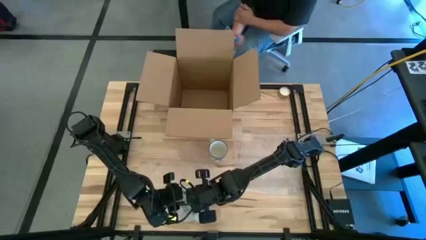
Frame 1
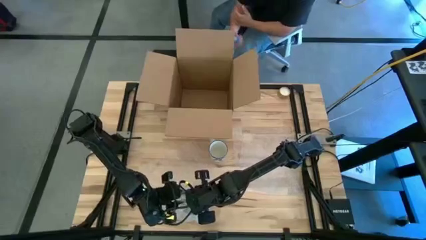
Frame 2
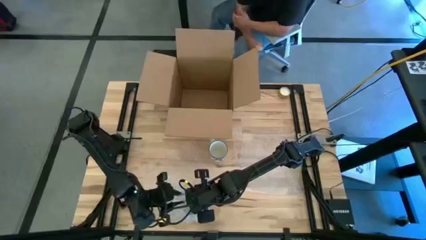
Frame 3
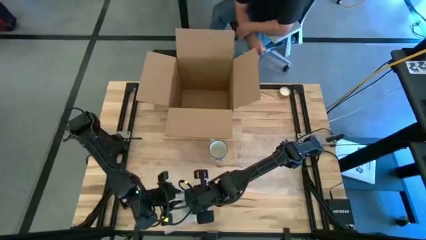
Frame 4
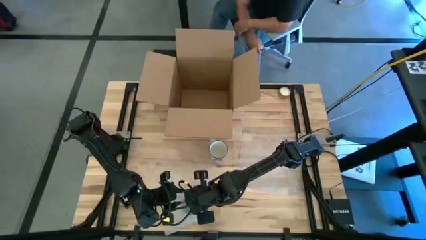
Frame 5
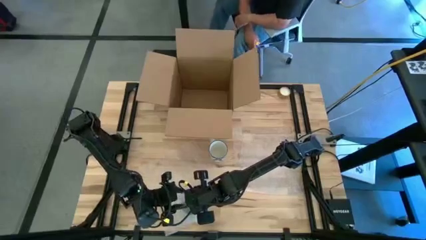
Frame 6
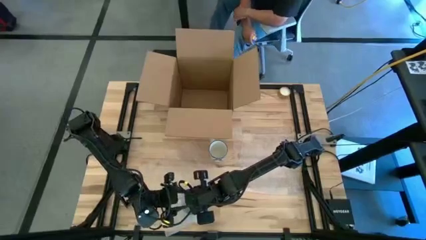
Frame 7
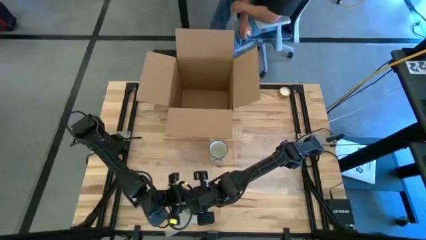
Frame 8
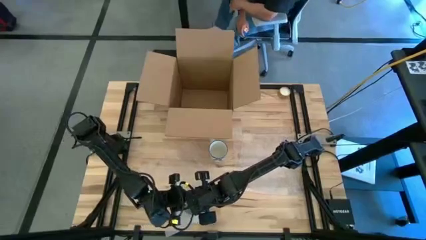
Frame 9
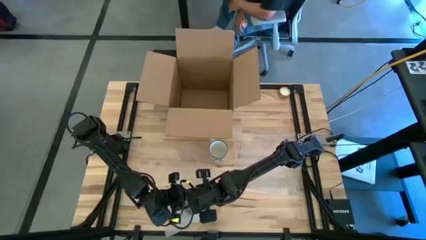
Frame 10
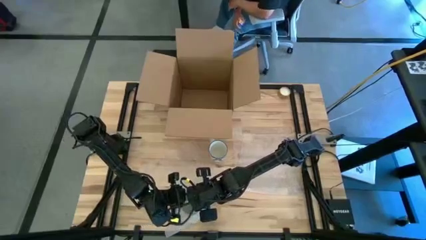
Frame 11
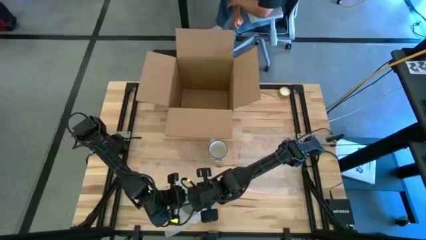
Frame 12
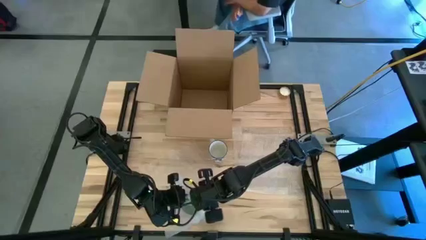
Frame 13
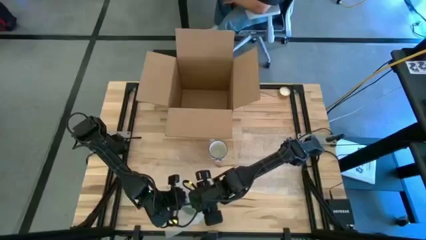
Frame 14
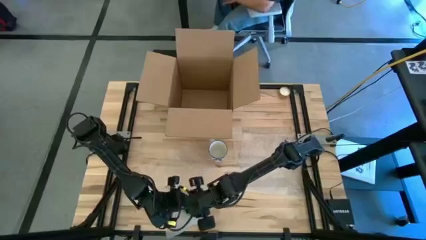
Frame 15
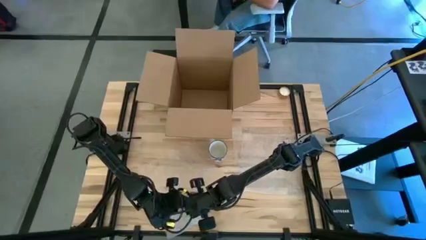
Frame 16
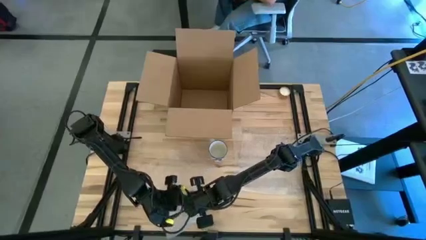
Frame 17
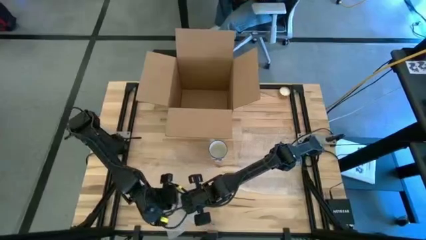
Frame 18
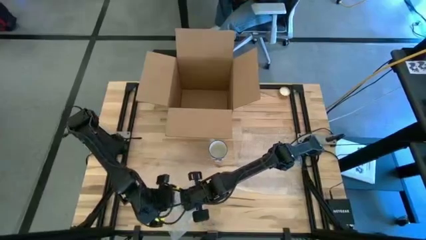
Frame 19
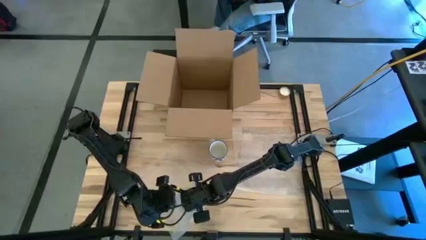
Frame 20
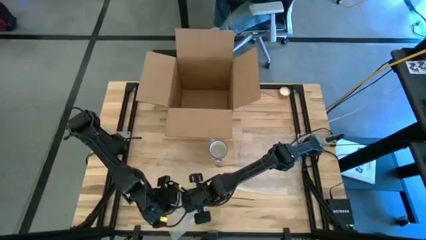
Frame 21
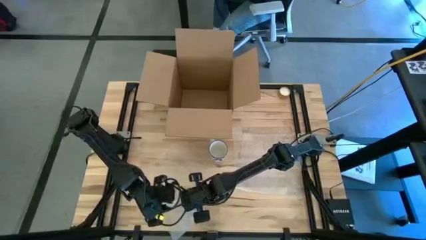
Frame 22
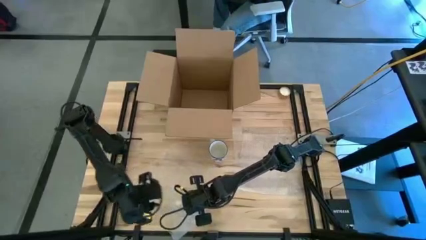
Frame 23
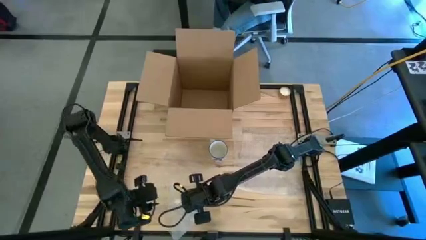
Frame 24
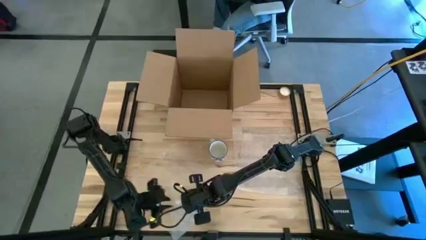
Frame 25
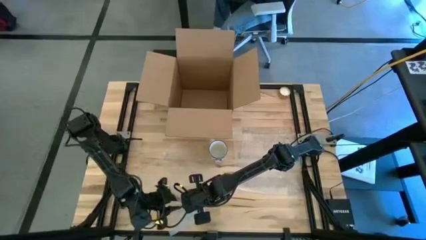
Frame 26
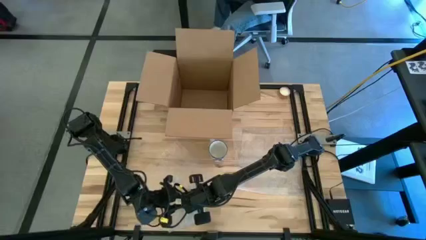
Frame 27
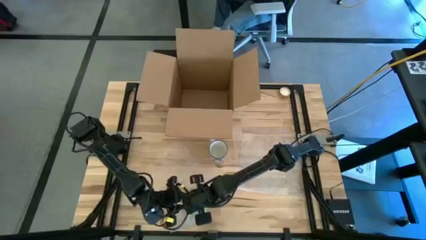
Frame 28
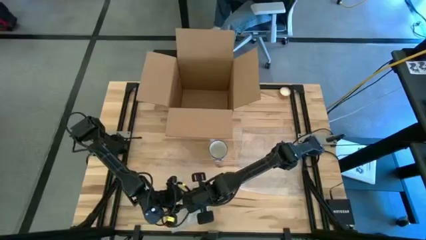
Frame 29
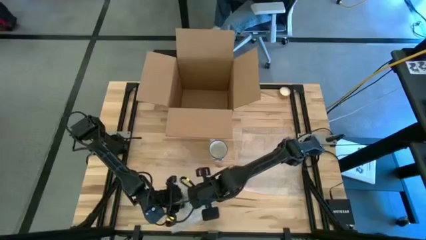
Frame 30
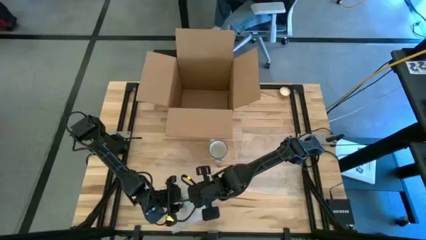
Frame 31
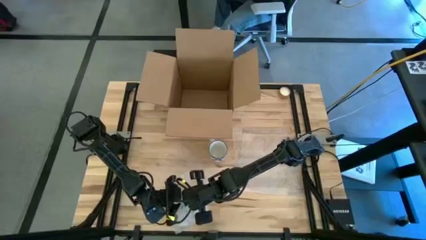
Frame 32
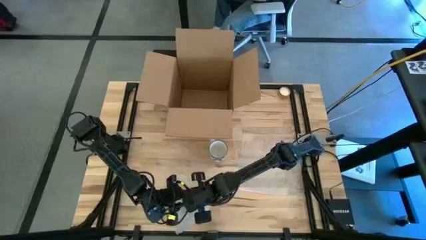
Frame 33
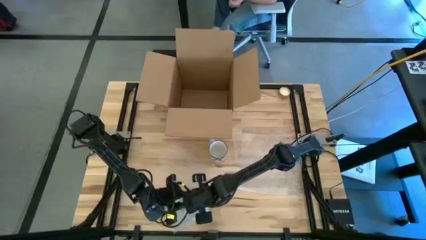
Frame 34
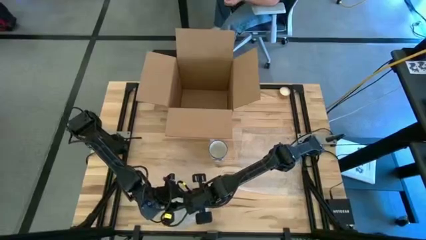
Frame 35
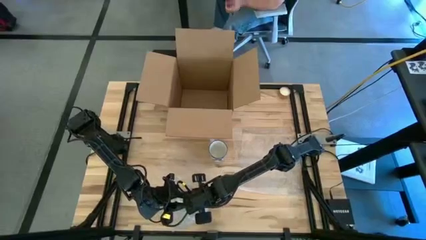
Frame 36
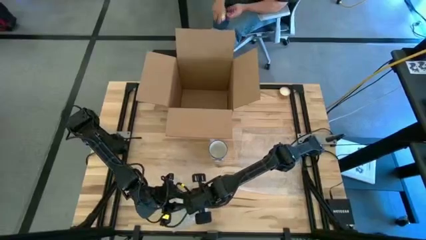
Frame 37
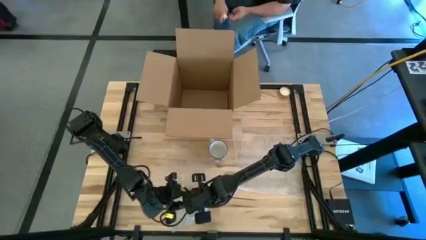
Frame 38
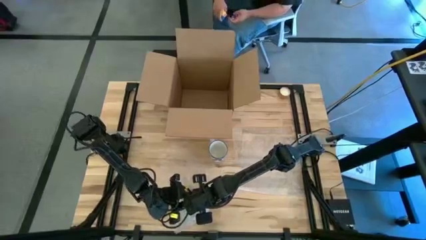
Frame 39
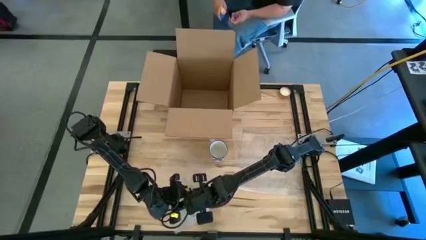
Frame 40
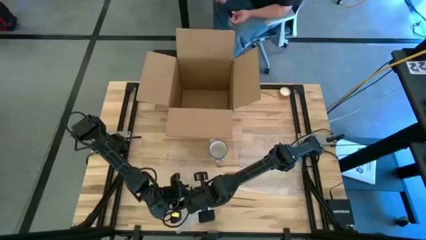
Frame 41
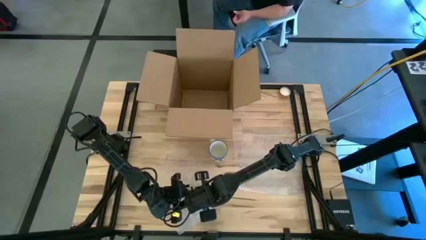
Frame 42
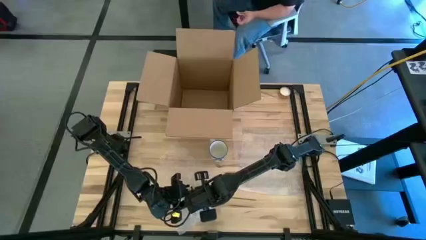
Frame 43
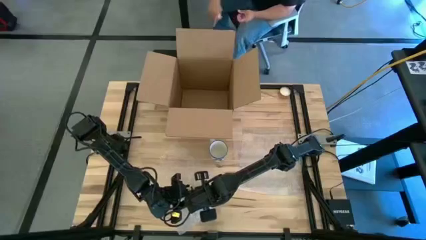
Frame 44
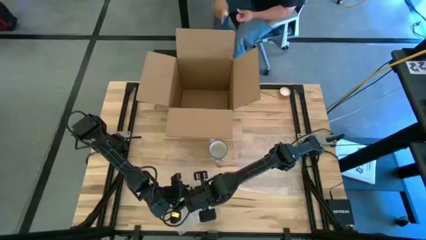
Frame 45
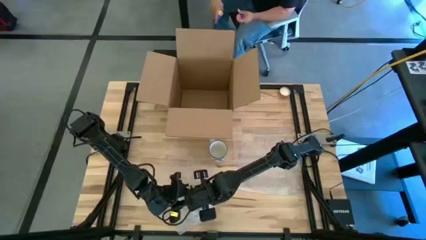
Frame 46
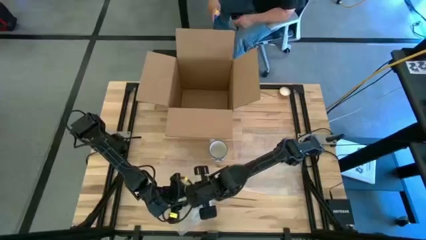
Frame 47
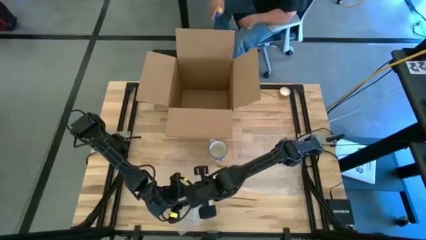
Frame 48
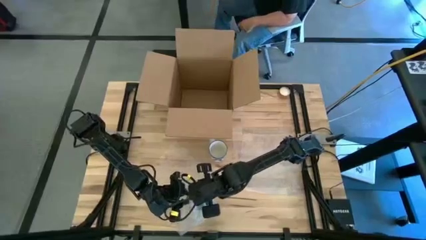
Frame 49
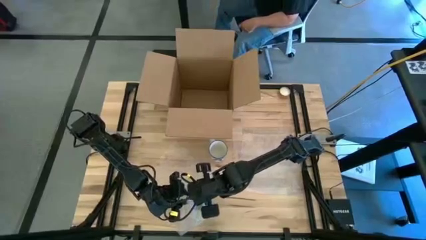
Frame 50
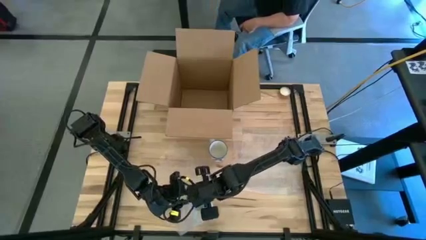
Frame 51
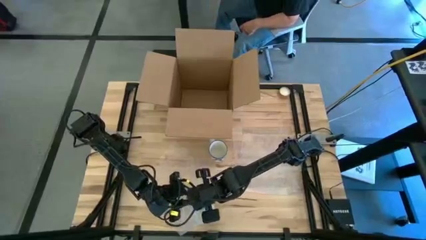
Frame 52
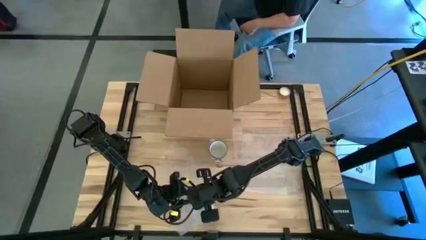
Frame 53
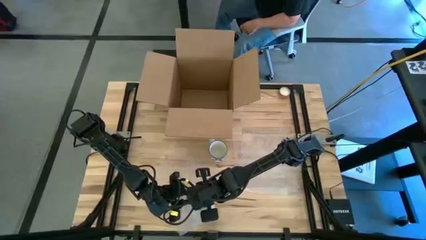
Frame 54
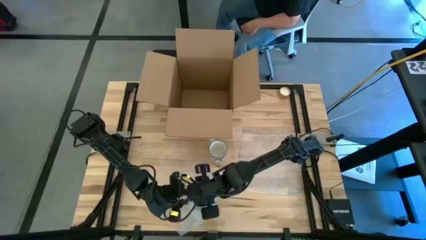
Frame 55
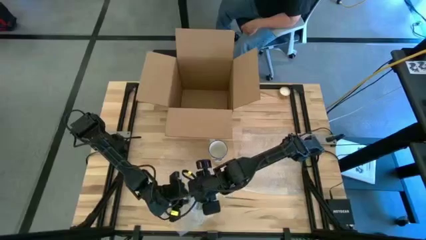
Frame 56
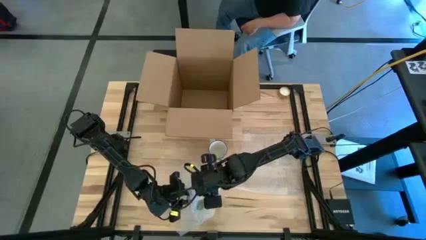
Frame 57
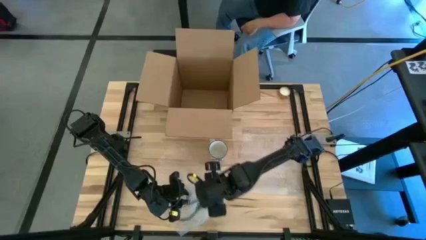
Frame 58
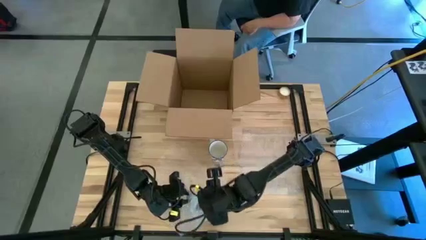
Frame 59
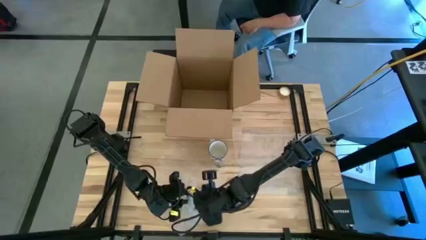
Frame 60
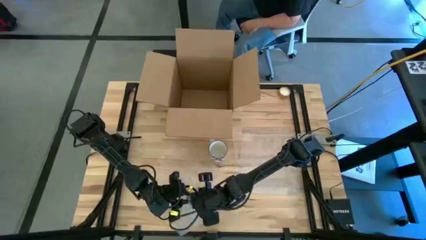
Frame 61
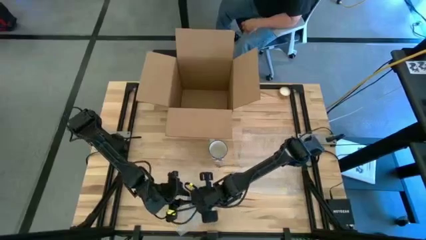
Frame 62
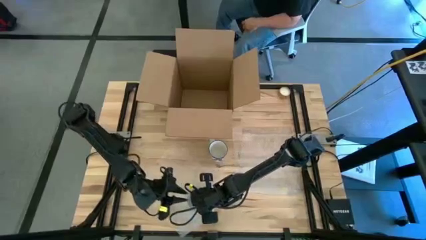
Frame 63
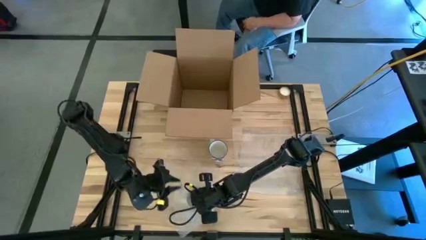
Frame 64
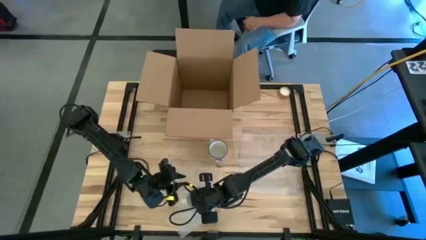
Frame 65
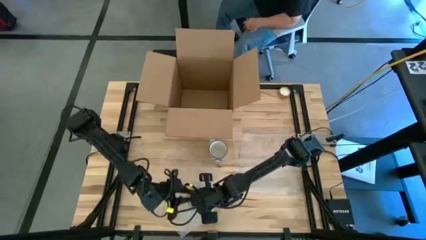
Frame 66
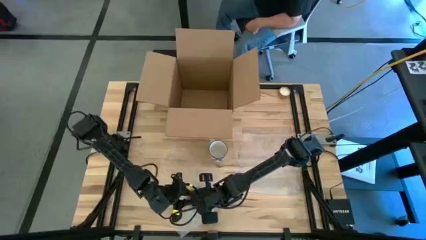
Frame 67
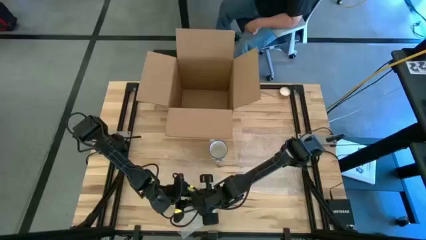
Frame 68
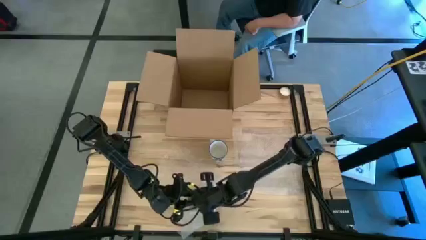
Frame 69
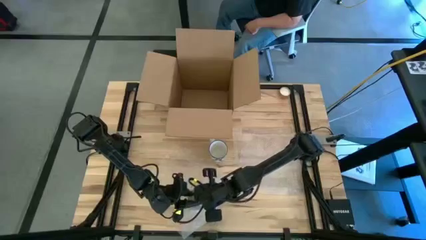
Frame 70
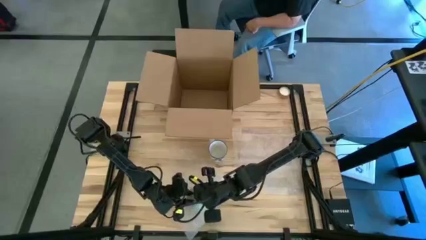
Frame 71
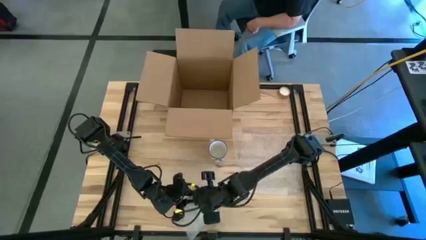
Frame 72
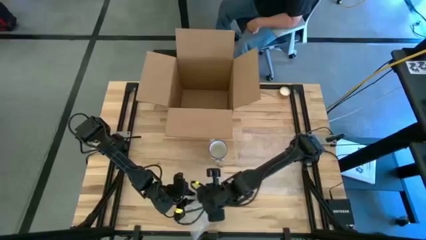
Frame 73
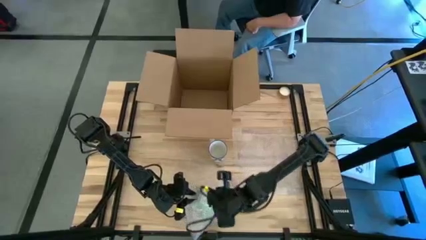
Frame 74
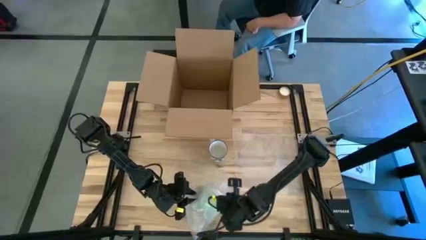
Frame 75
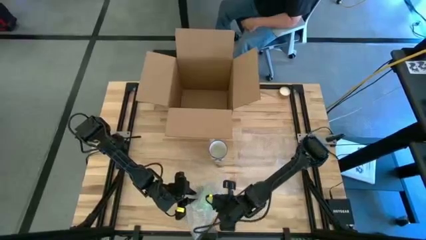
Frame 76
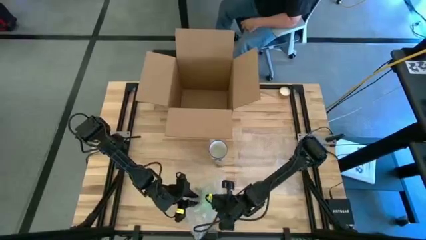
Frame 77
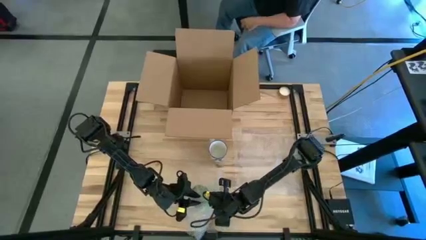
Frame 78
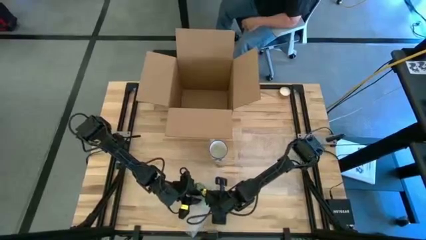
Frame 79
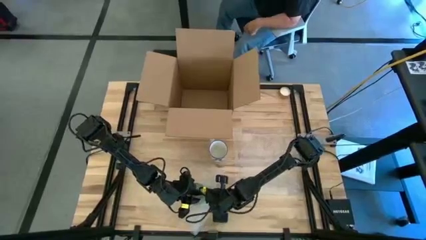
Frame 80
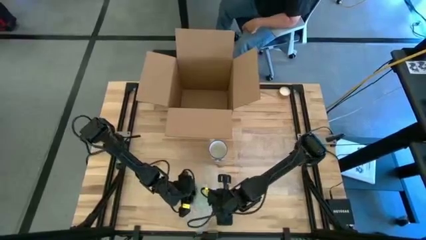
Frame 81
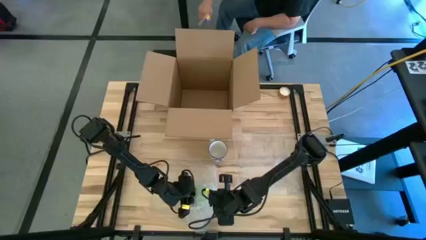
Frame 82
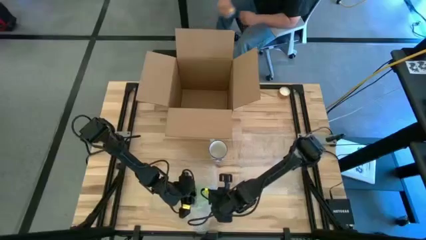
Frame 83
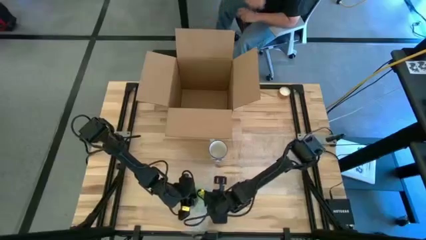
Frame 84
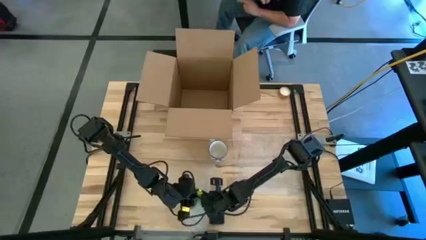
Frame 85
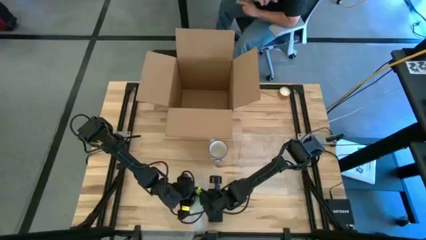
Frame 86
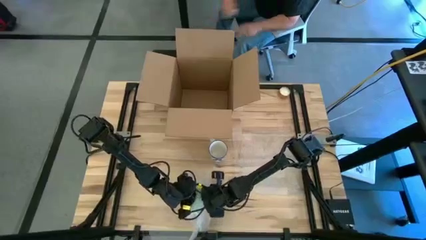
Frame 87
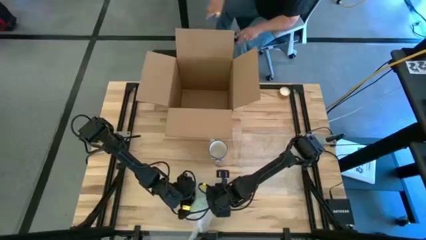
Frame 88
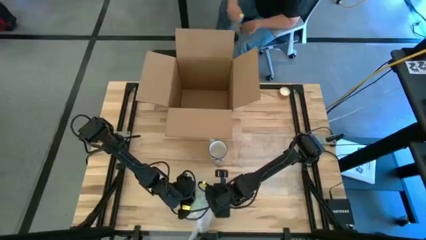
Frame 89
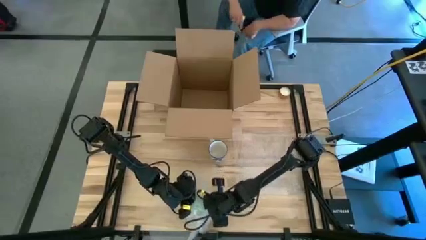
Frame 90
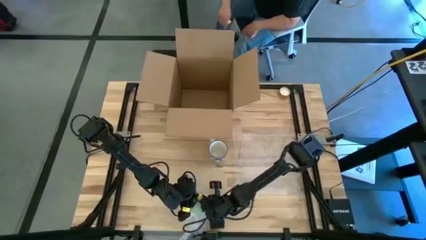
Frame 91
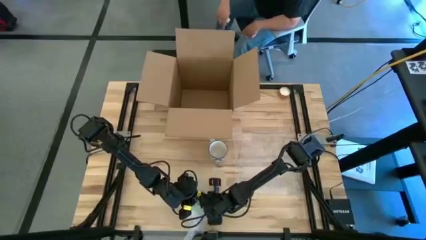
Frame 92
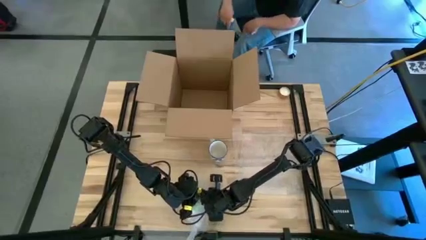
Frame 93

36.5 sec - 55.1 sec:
Task: wrap mug
Wrap the green mug with the left side transparent bubble wrap
